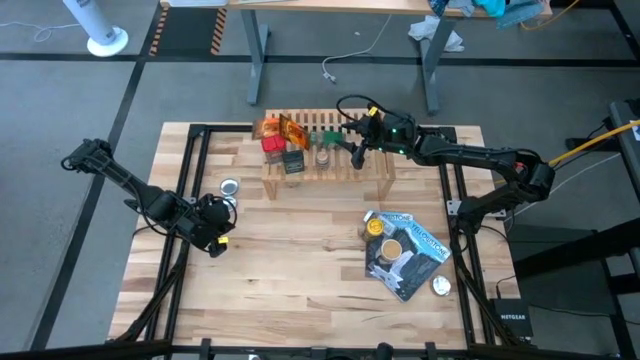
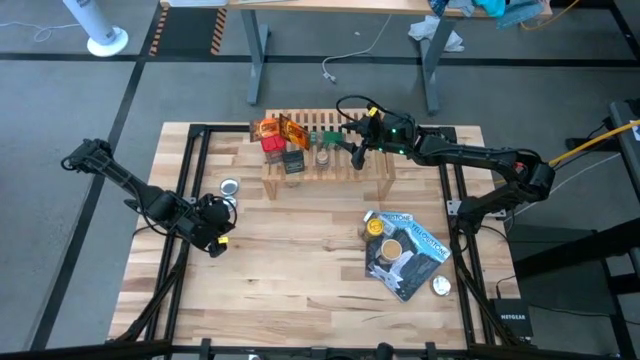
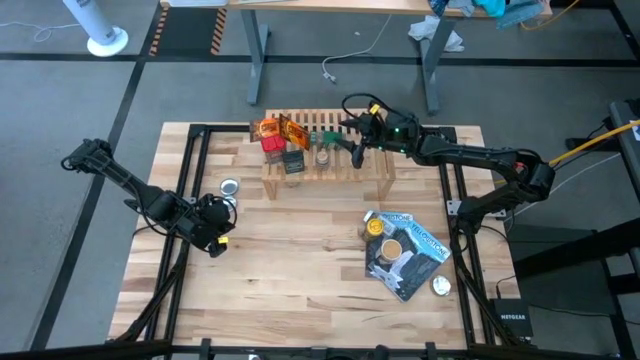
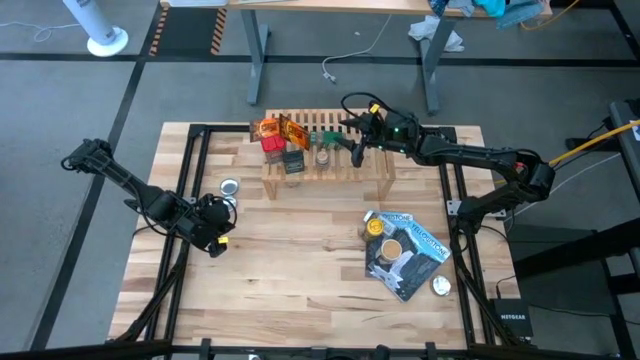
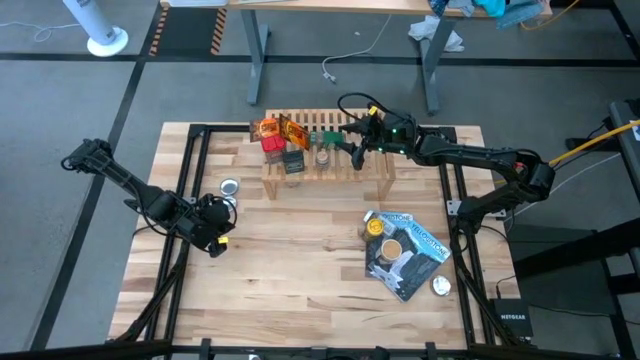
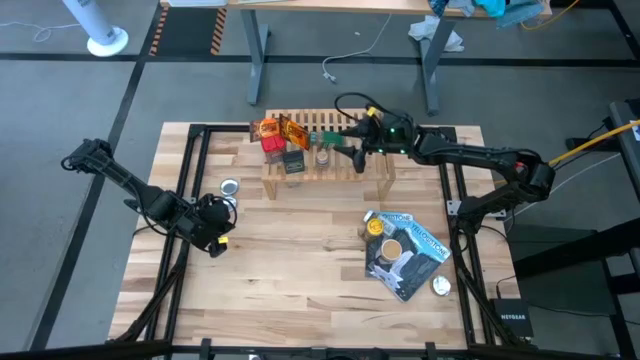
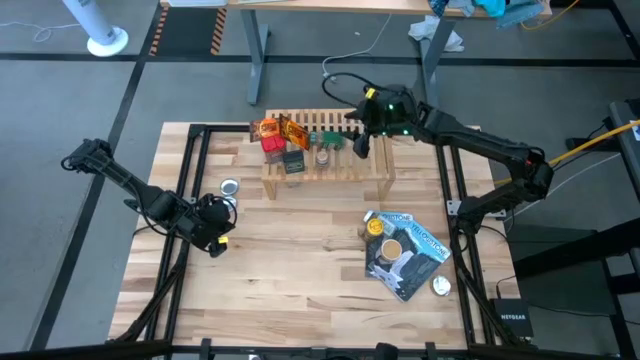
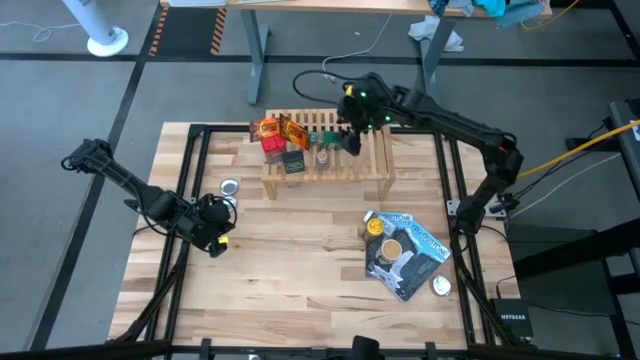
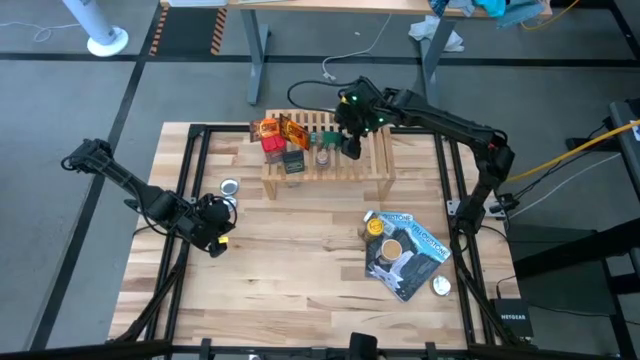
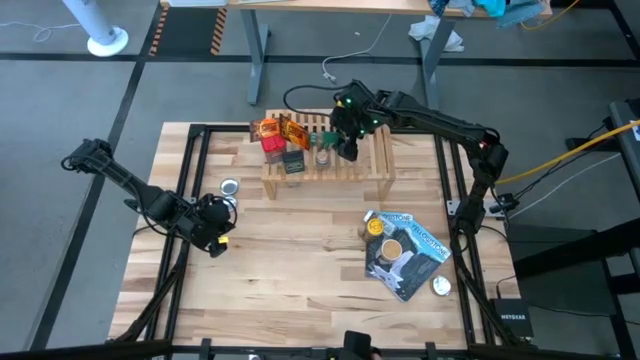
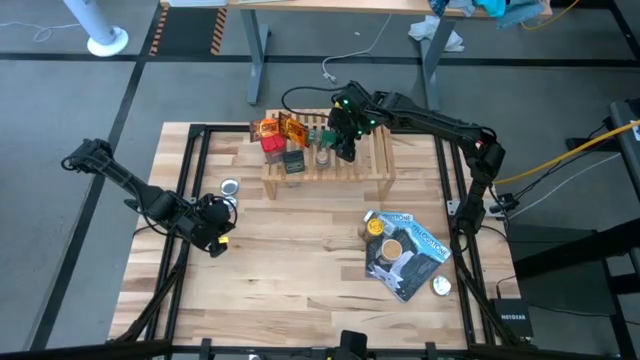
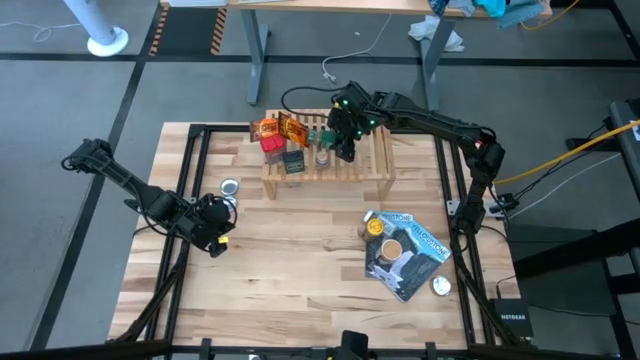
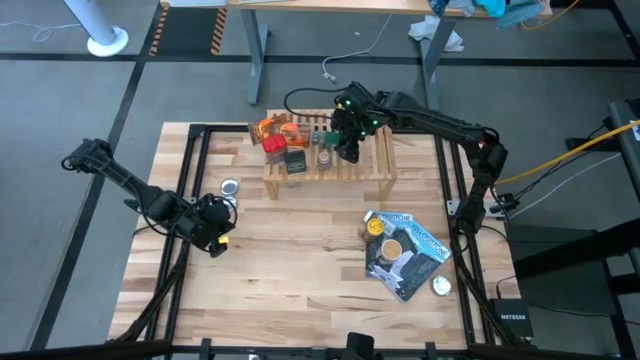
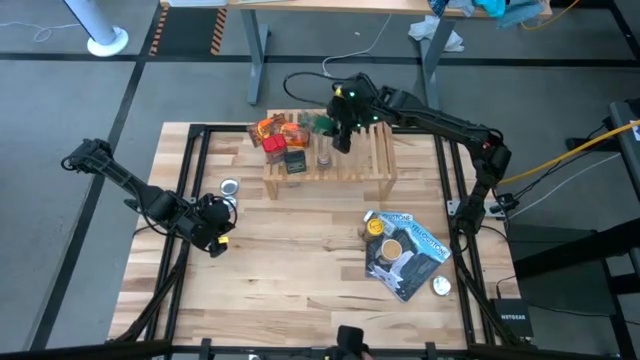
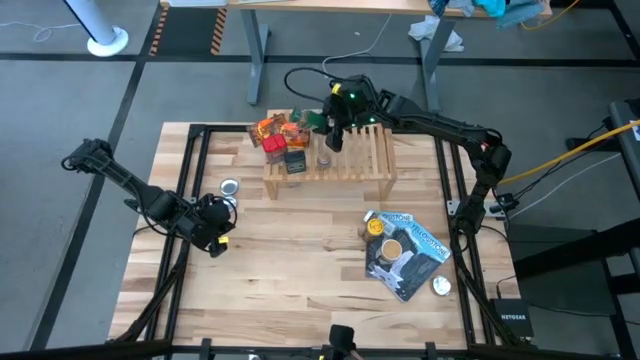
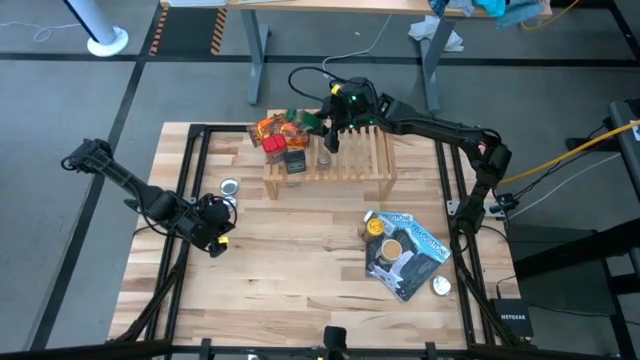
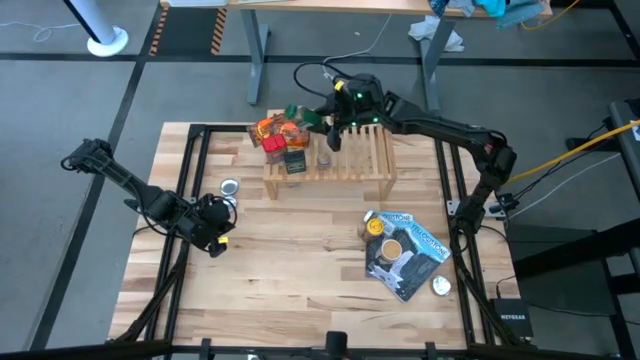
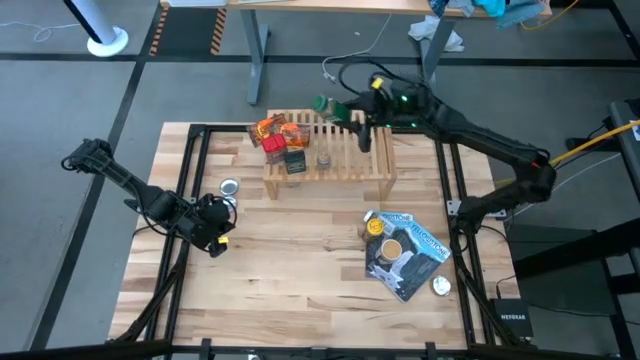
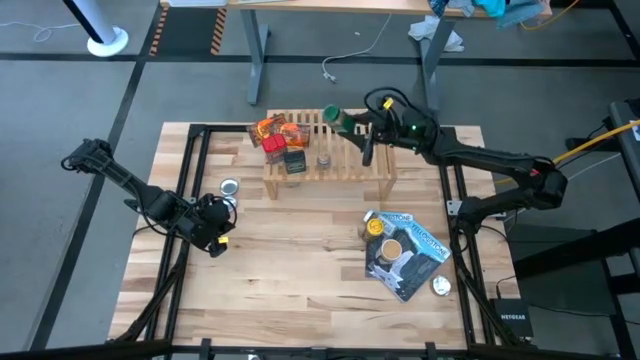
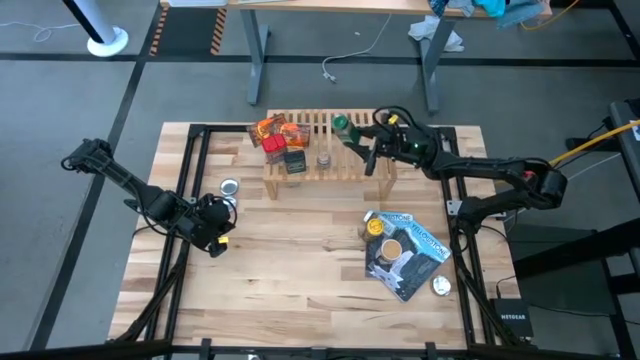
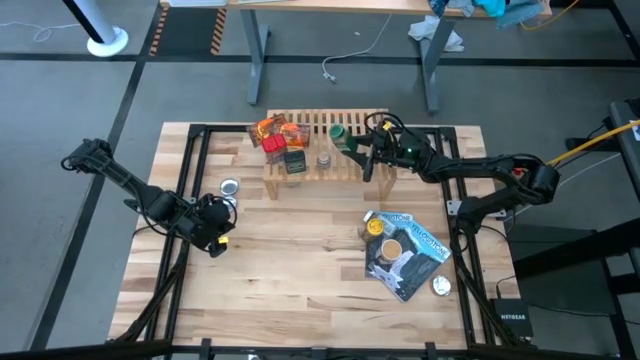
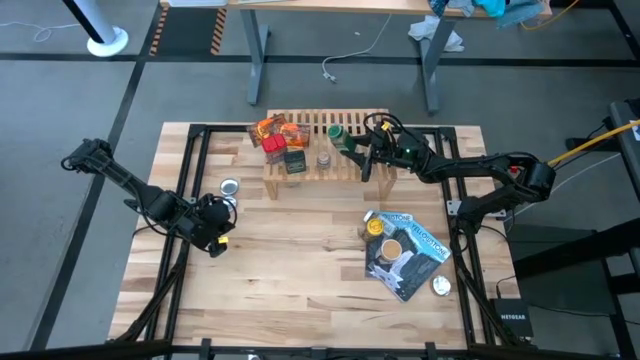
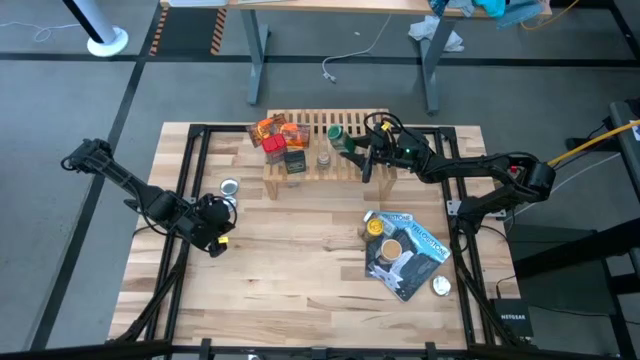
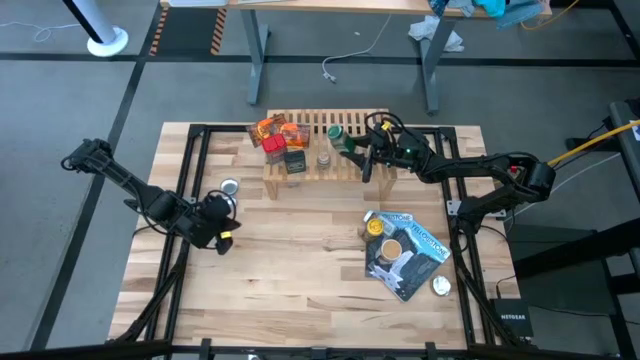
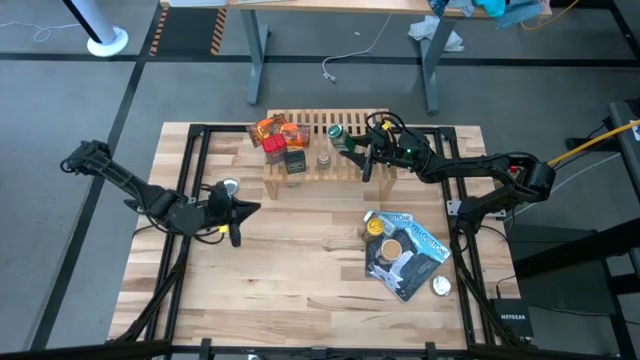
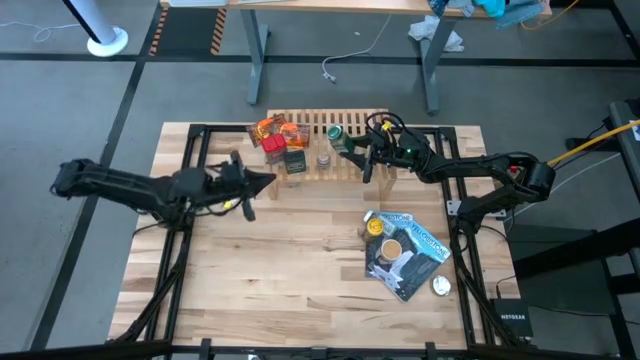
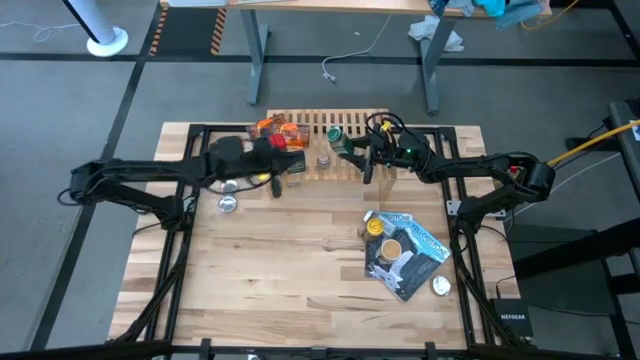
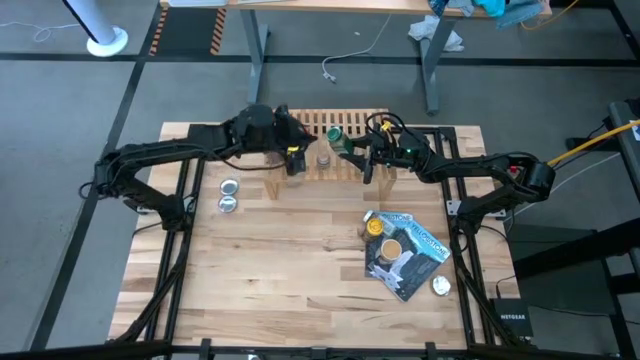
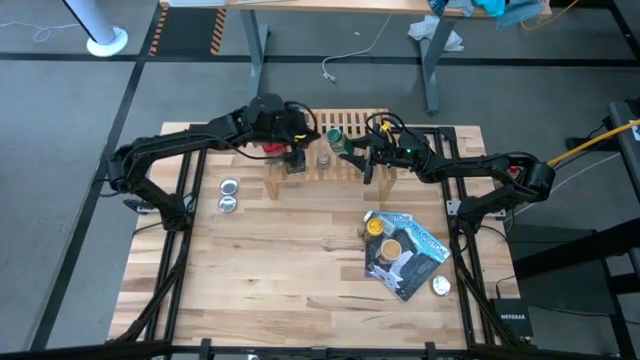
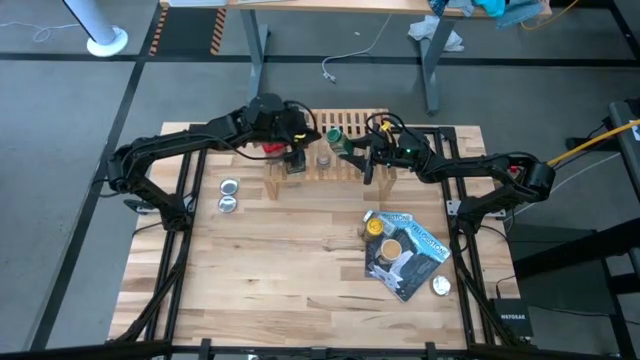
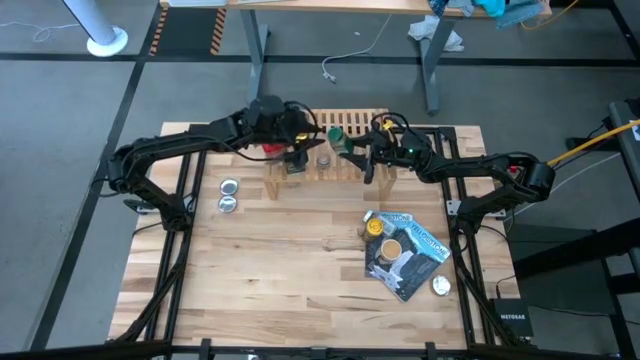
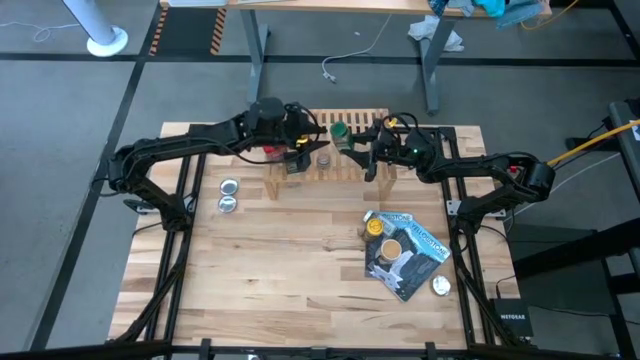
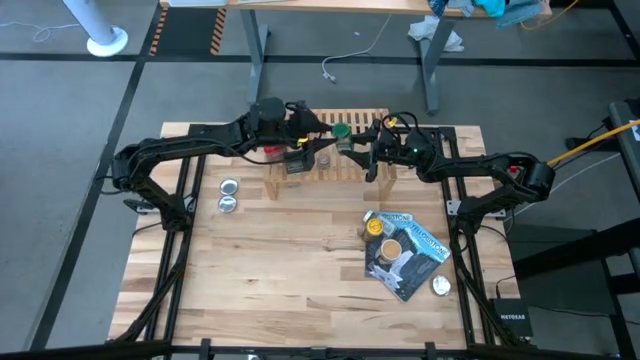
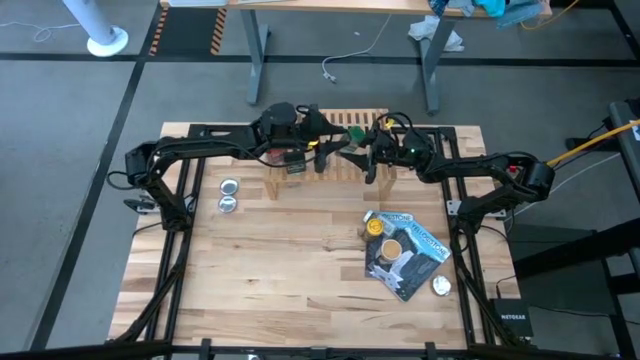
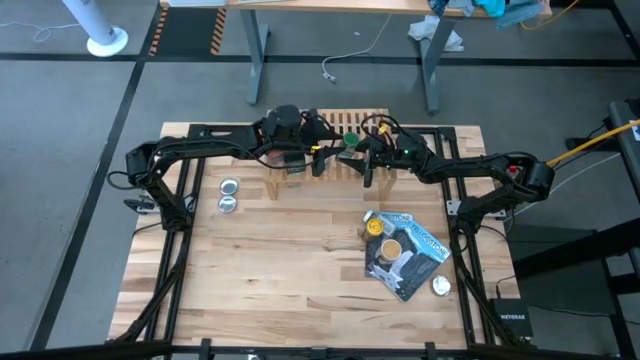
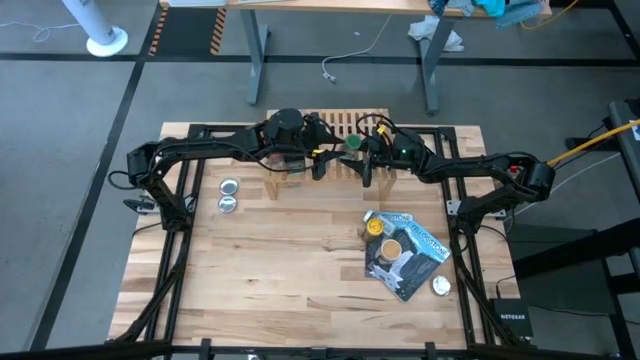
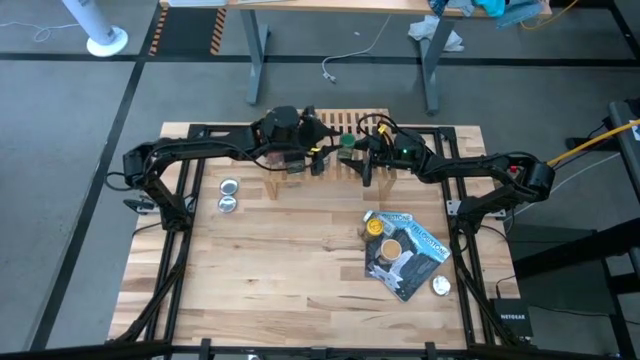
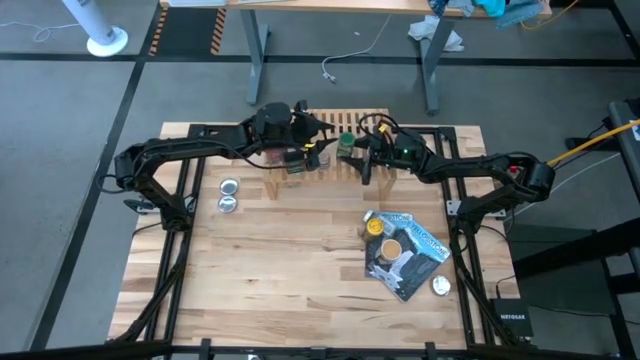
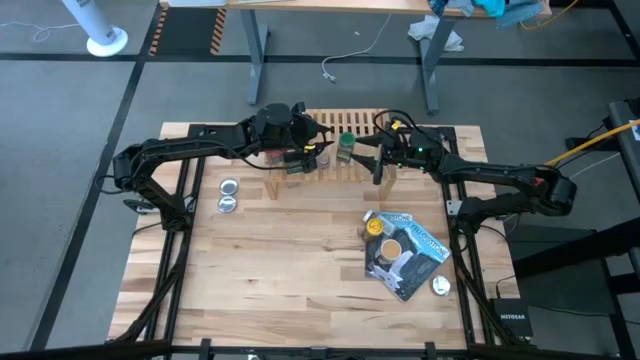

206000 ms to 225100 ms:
Task: Shelf spices
Put the green seasoning bottle on the shelf

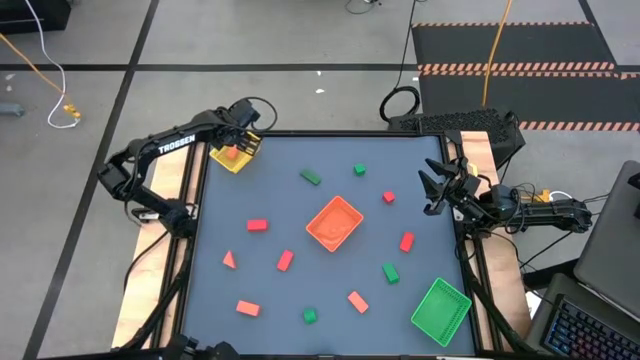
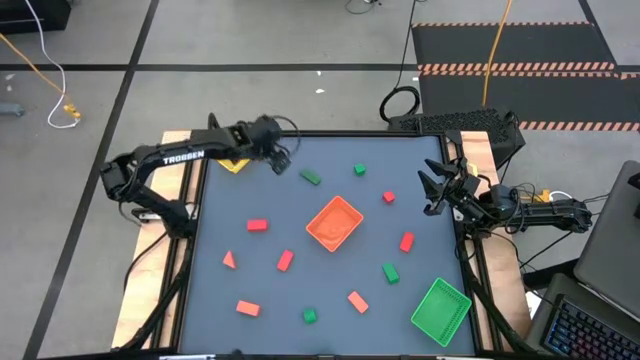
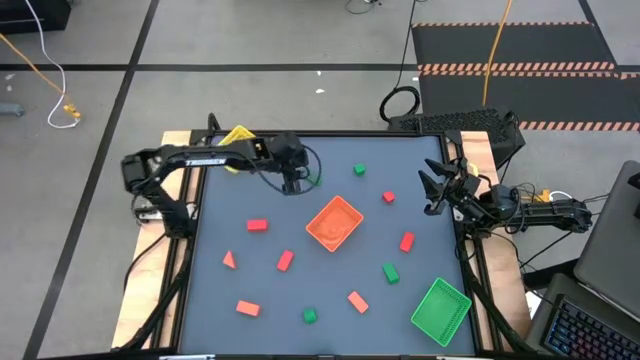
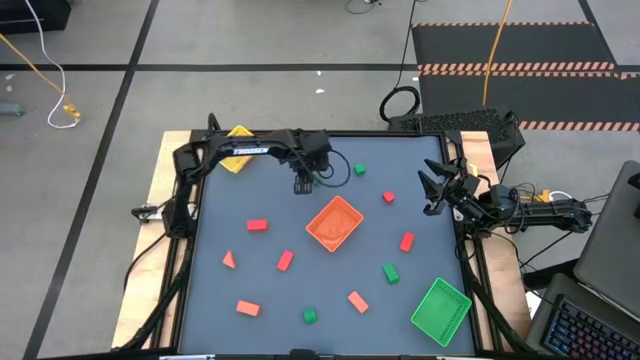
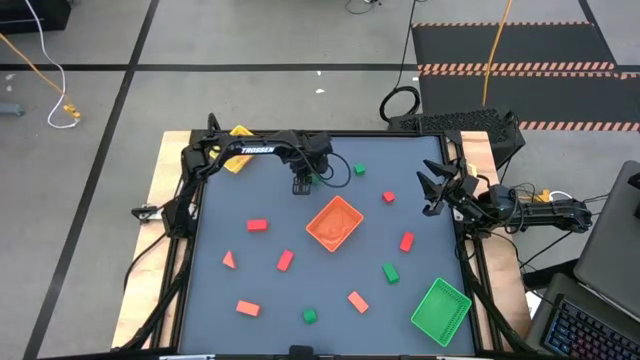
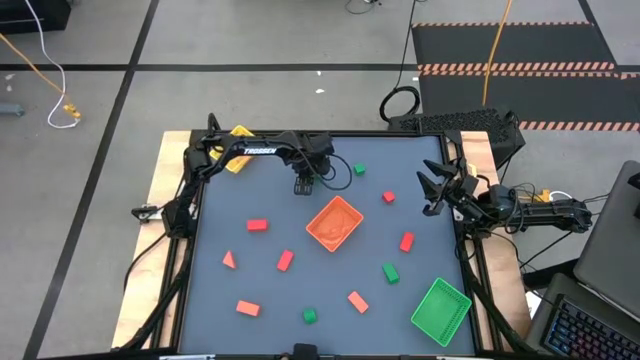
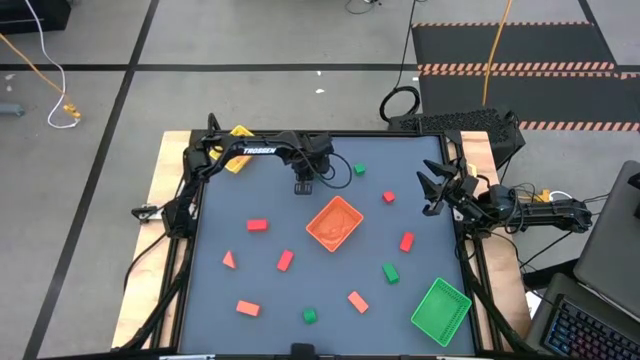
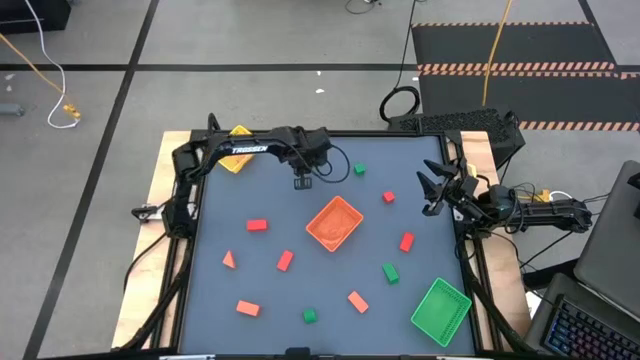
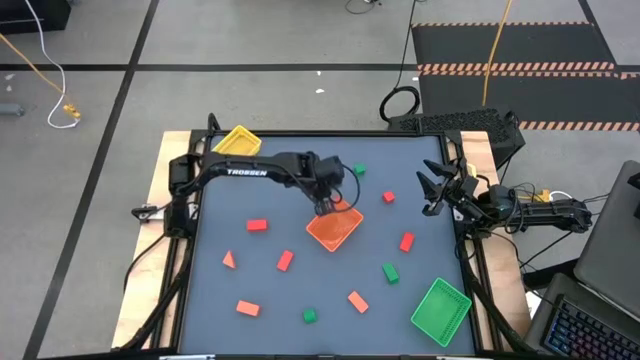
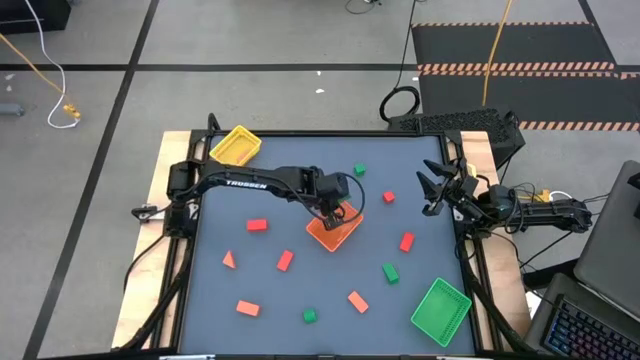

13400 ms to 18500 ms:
Task: Sort & place blocks by color
Put the green block into the orange bin
